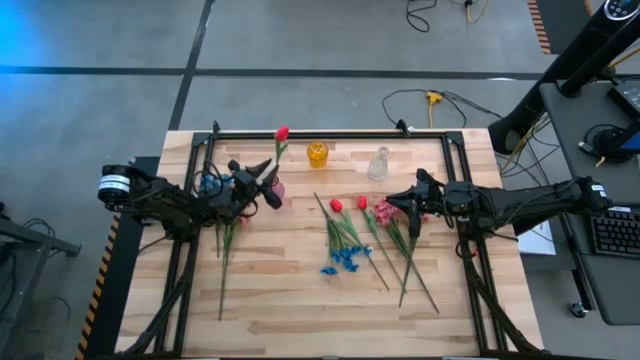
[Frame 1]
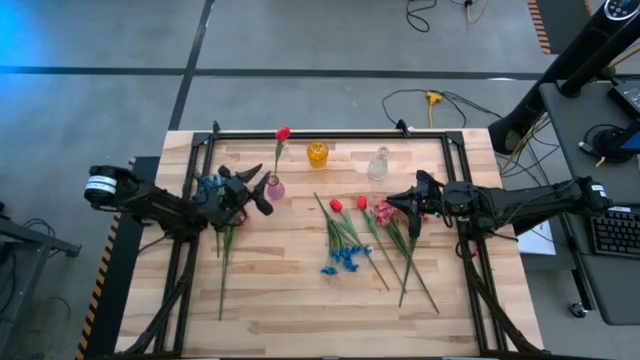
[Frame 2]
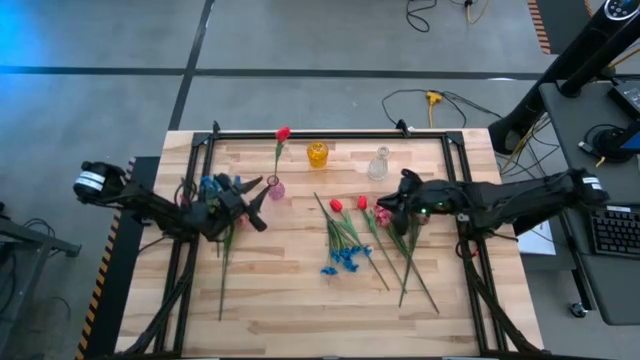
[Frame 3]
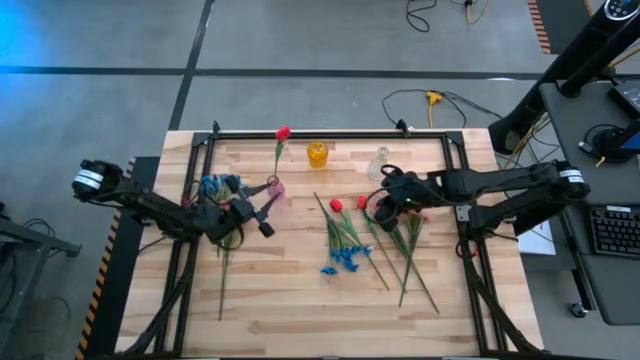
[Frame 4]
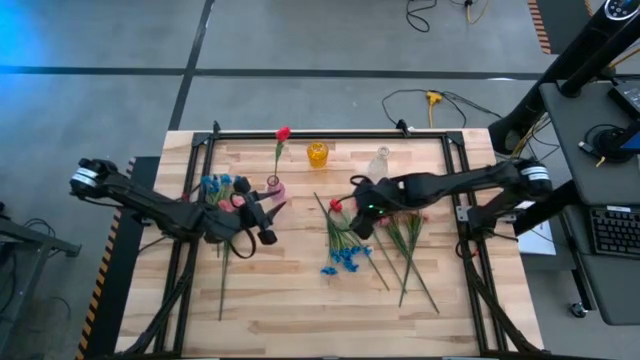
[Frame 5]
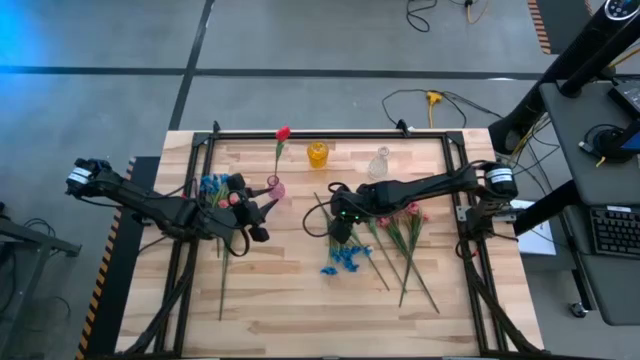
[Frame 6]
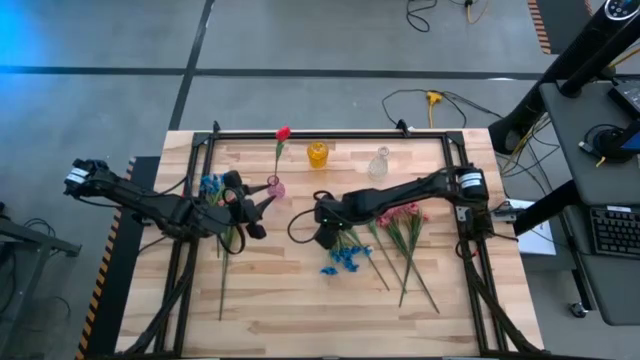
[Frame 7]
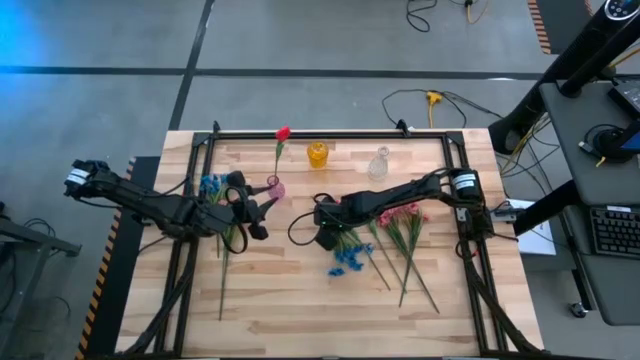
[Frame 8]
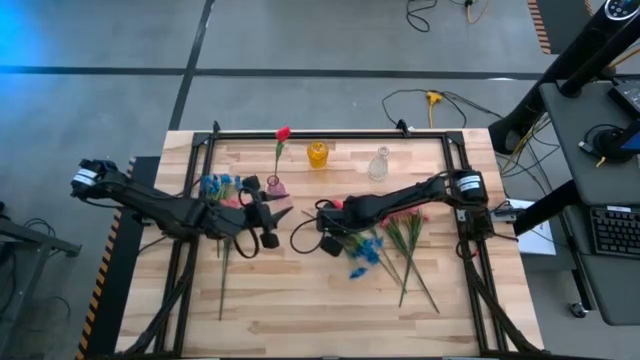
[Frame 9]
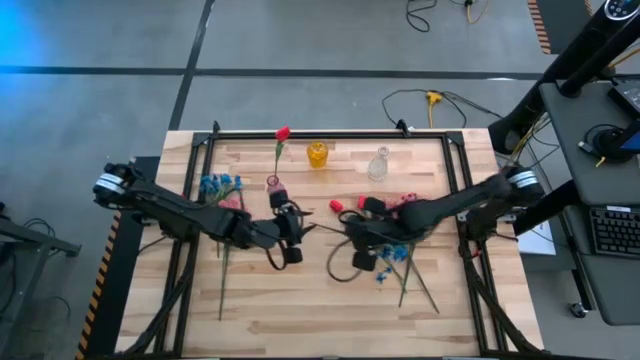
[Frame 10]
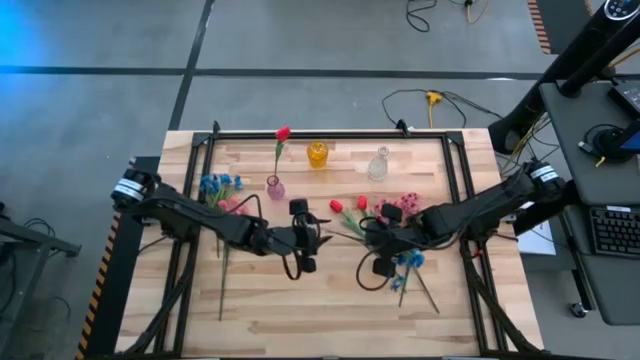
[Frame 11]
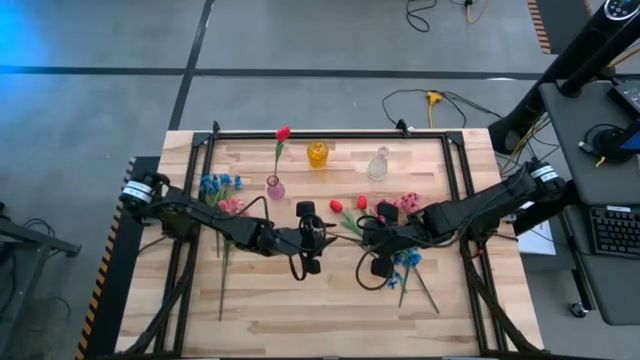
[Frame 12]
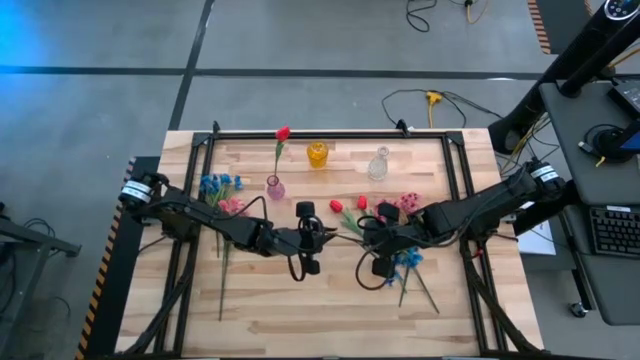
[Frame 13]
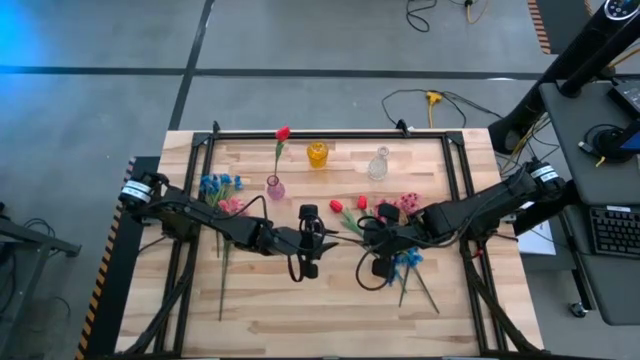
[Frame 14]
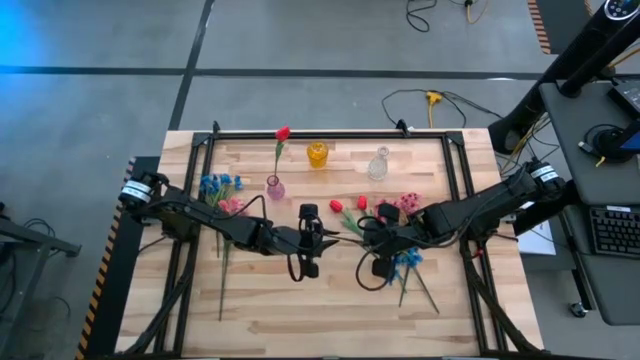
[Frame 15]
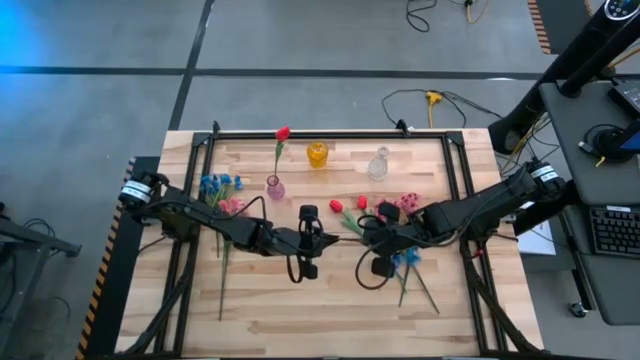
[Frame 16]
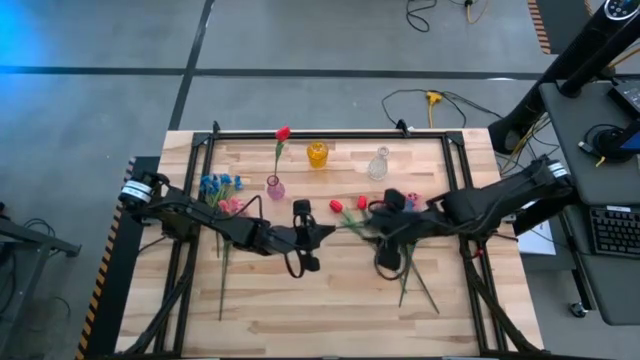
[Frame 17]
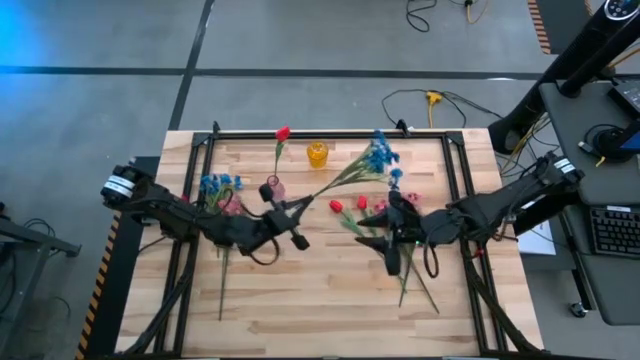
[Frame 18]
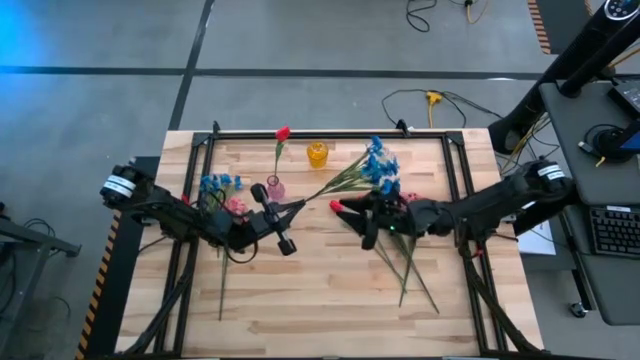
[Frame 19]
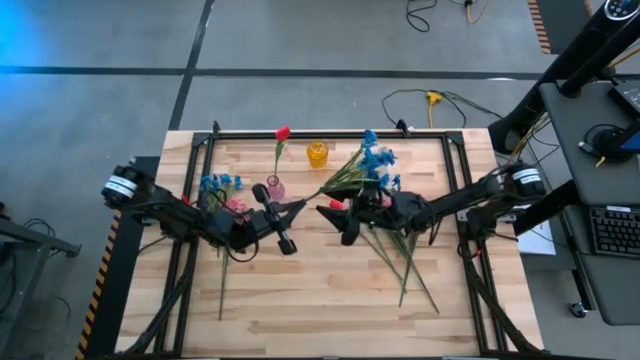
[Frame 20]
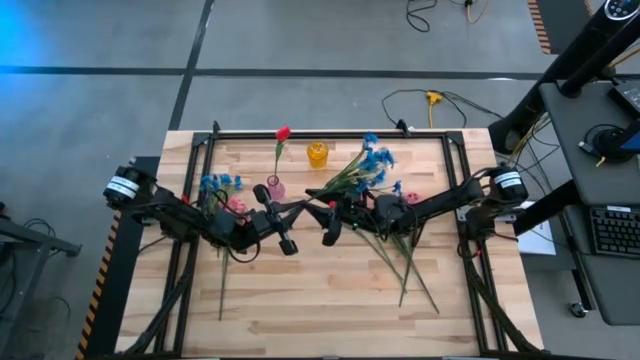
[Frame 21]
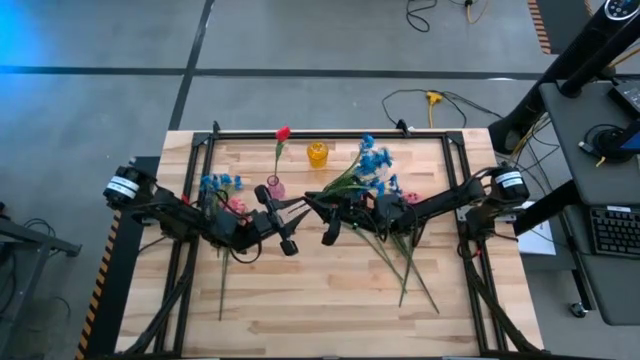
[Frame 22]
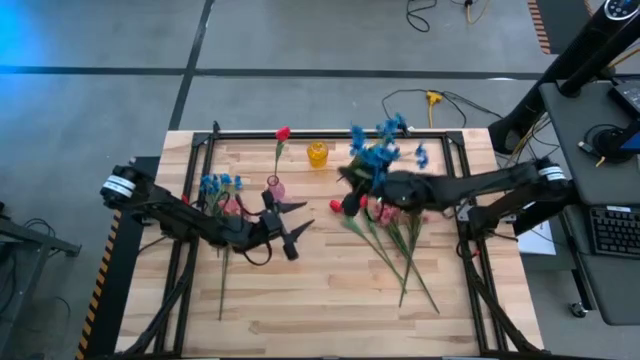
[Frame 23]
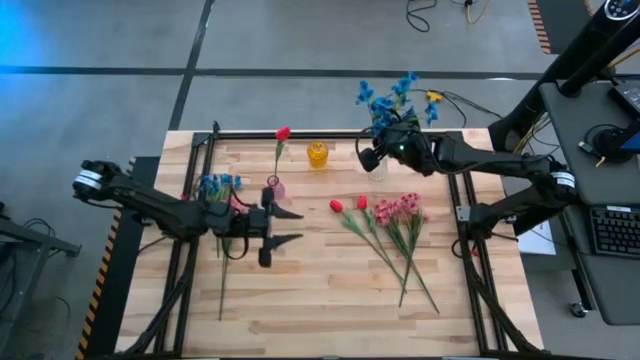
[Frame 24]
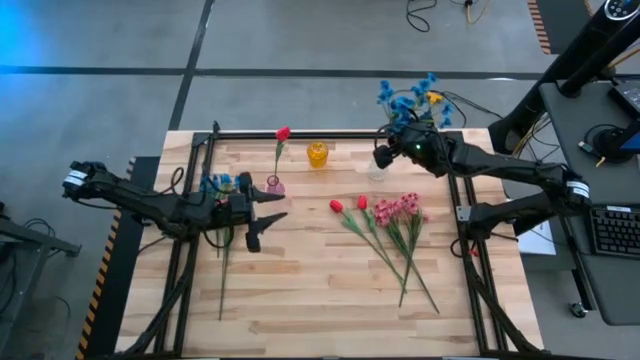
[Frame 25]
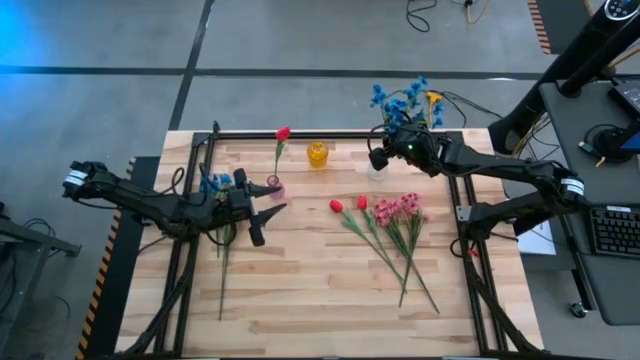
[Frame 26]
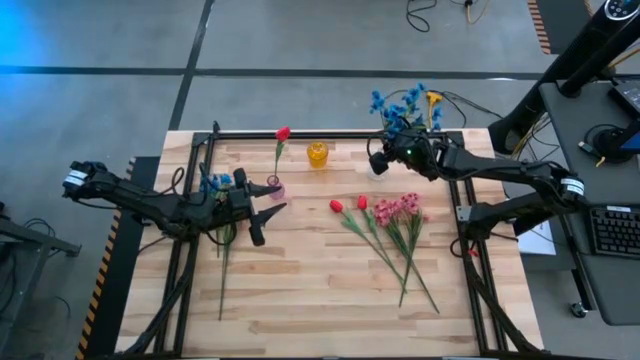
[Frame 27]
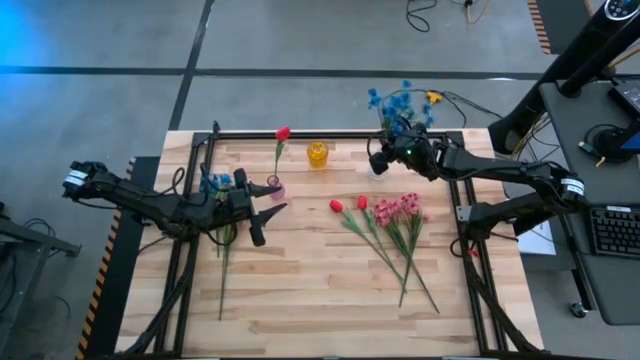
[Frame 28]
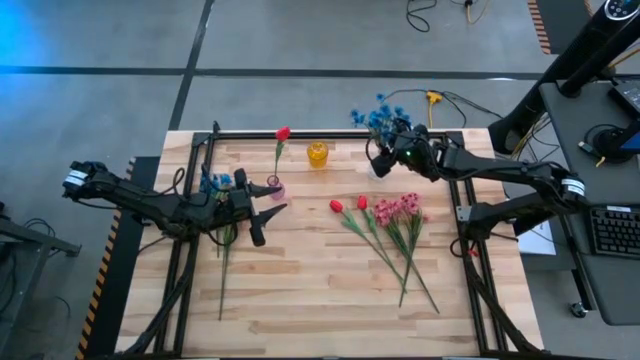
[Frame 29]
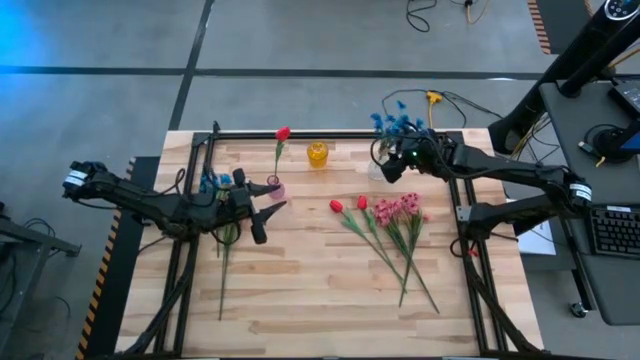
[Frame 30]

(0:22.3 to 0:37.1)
Task: Sort flowers into vase by color
Put the right blue flowers into the transparent vase

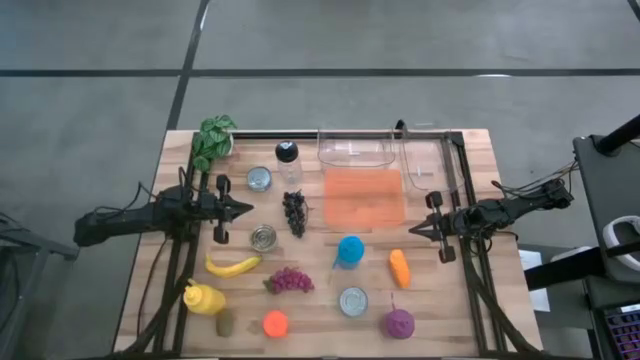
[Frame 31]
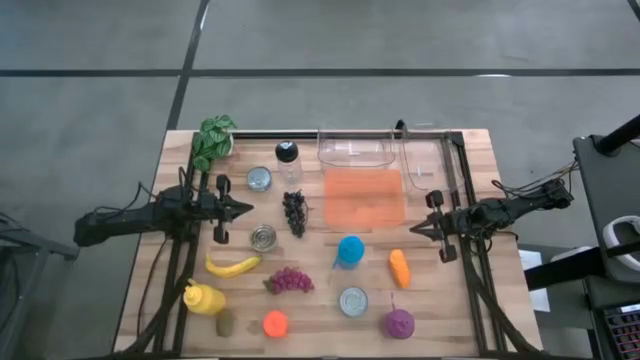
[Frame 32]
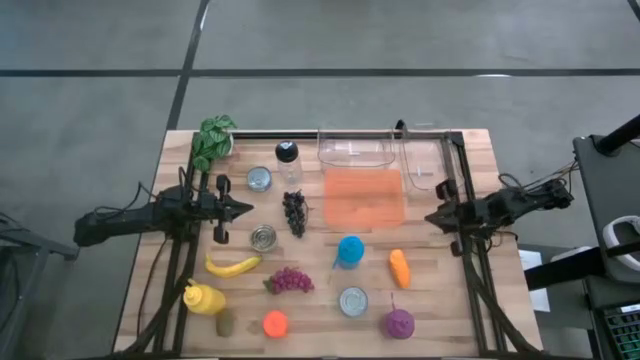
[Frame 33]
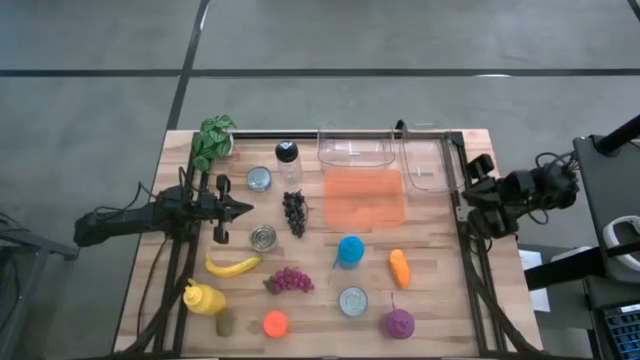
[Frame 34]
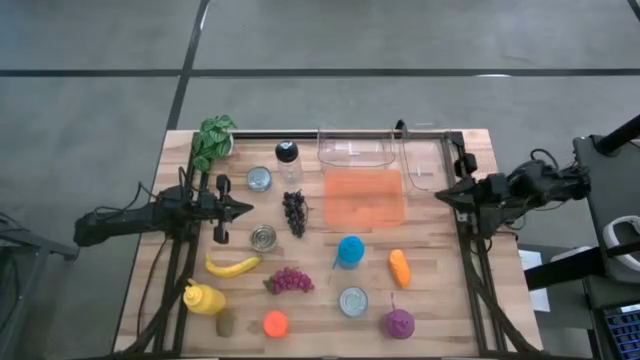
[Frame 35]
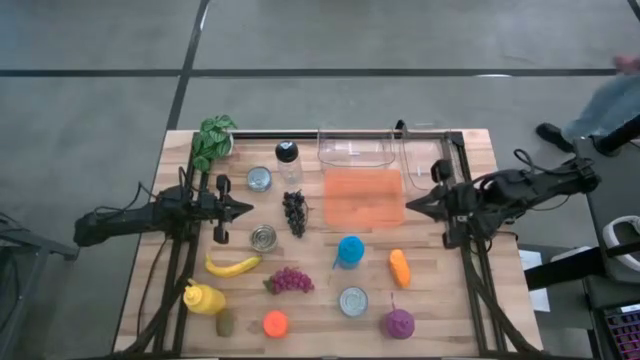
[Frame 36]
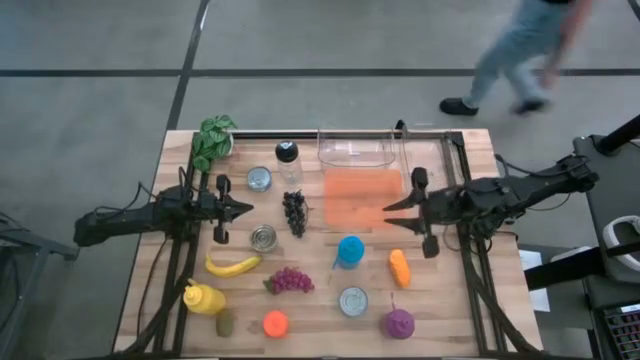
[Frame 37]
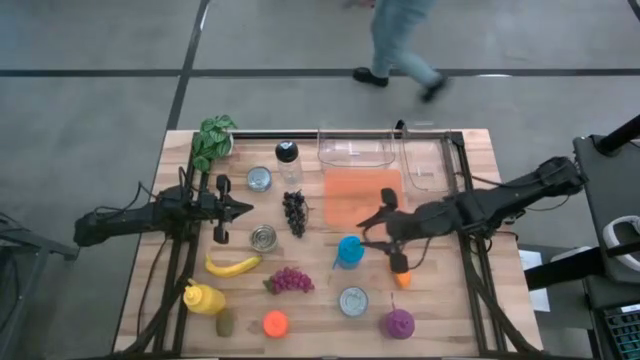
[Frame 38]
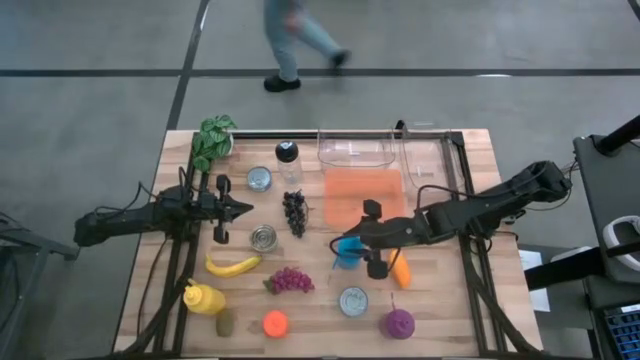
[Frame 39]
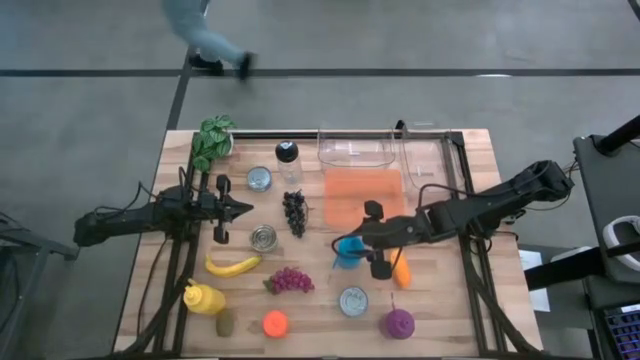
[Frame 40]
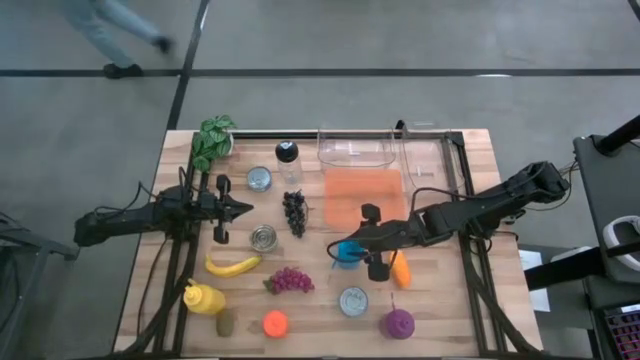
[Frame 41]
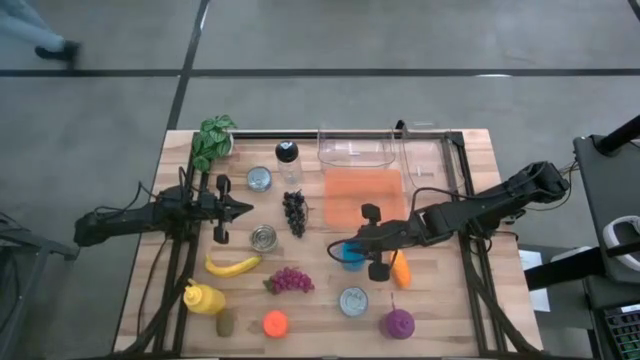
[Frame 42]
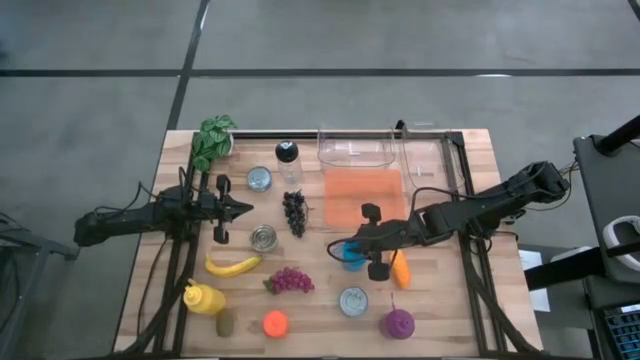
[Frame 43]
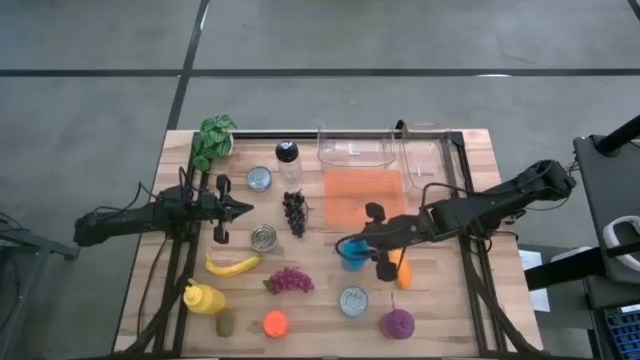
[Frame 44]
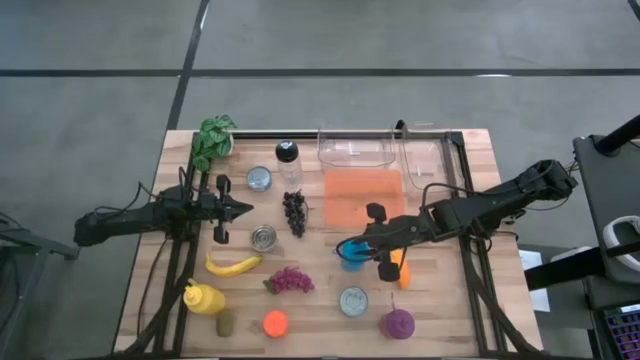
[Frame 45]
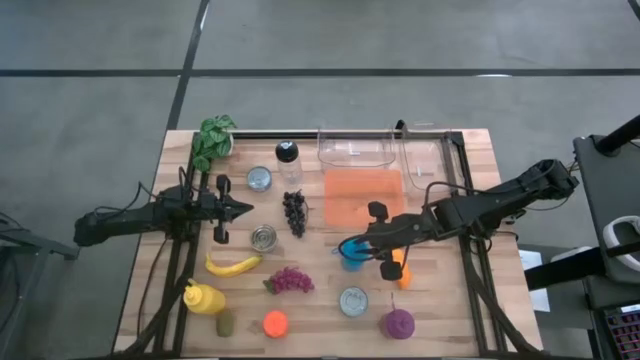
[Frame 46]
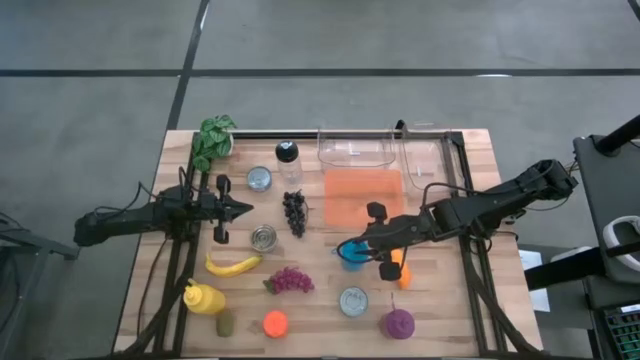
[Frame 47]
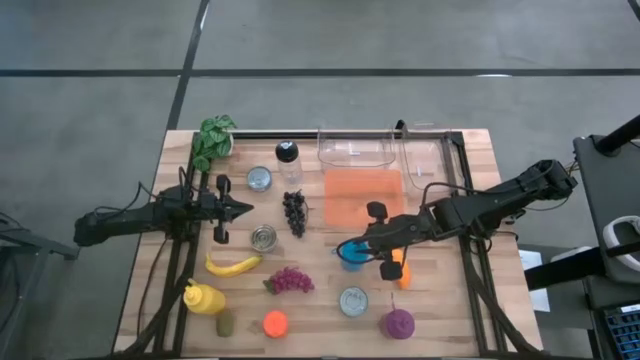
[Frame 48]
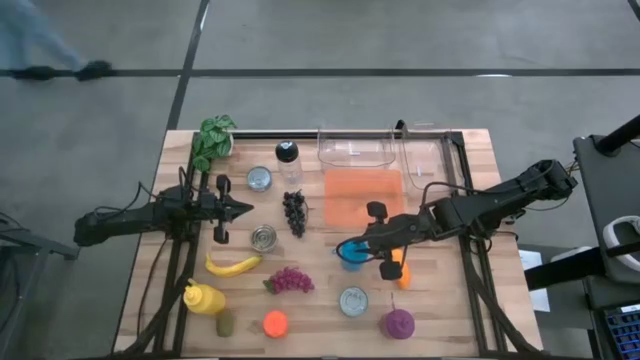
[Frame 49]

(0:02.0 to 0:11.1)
Task: Pick & Place Food Item
Put the blue water bottle into the right transparent bin
